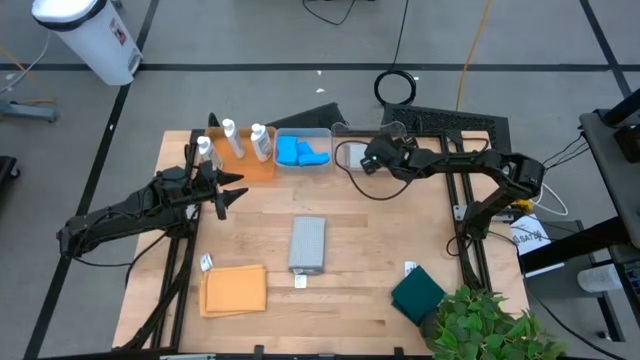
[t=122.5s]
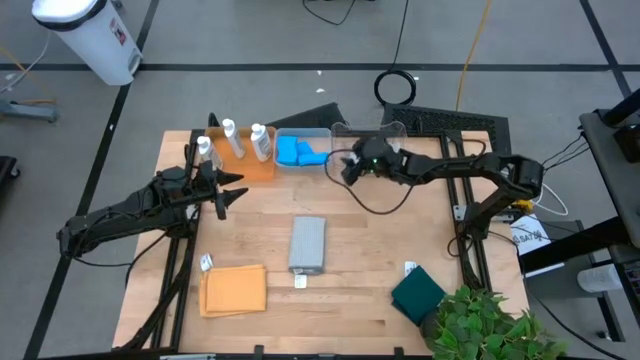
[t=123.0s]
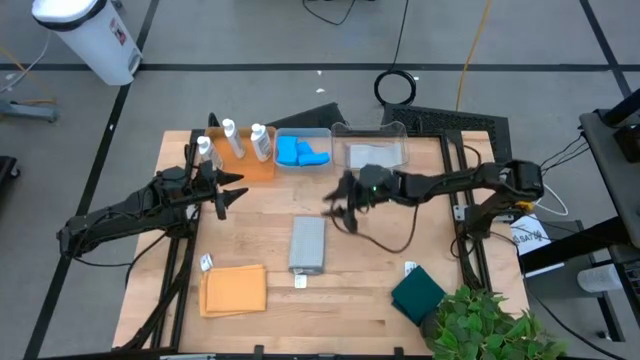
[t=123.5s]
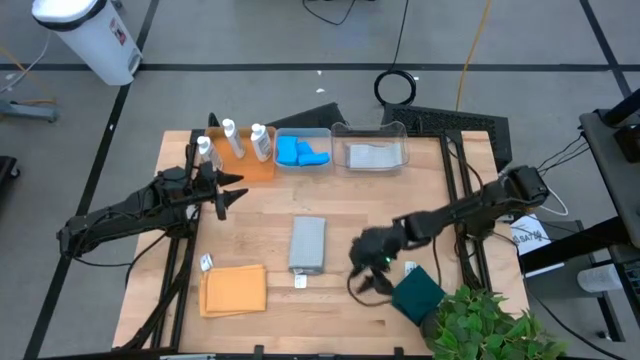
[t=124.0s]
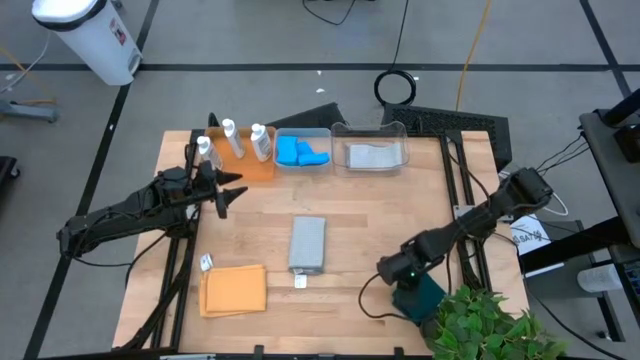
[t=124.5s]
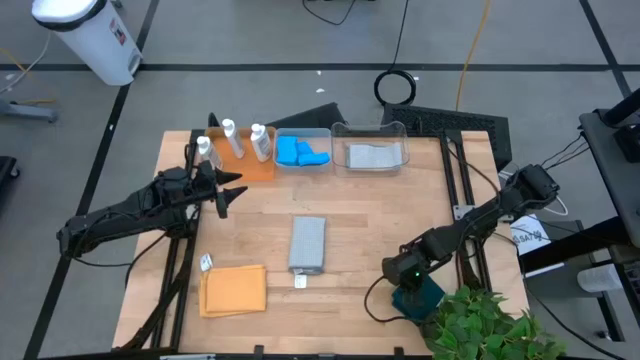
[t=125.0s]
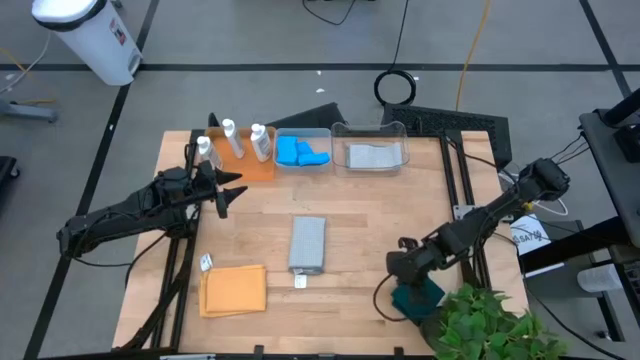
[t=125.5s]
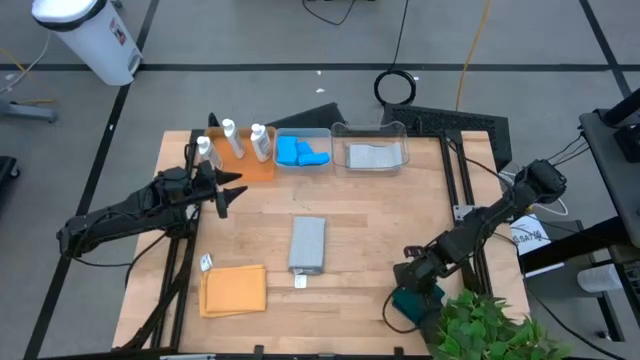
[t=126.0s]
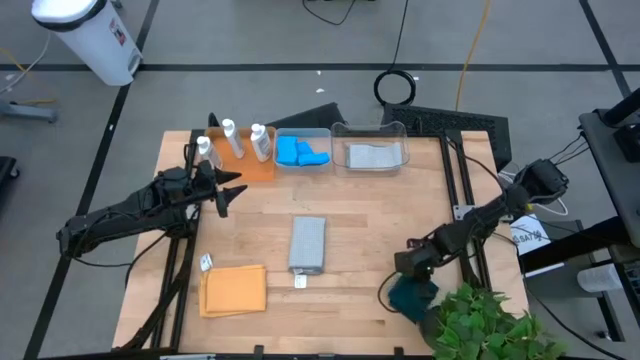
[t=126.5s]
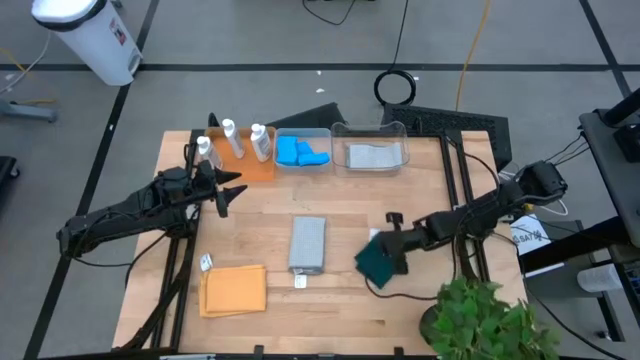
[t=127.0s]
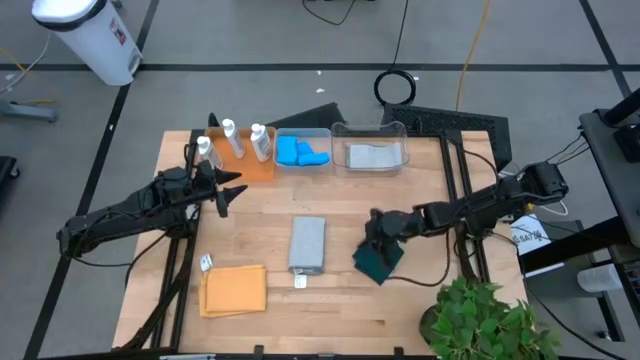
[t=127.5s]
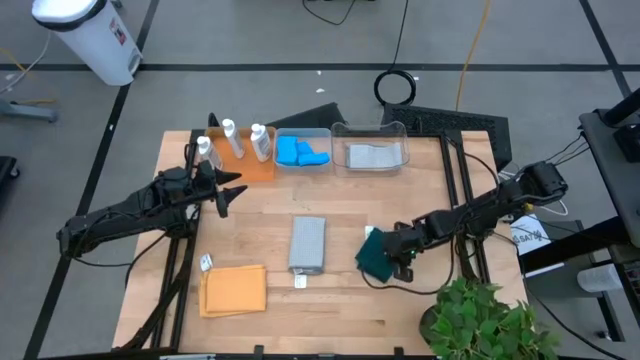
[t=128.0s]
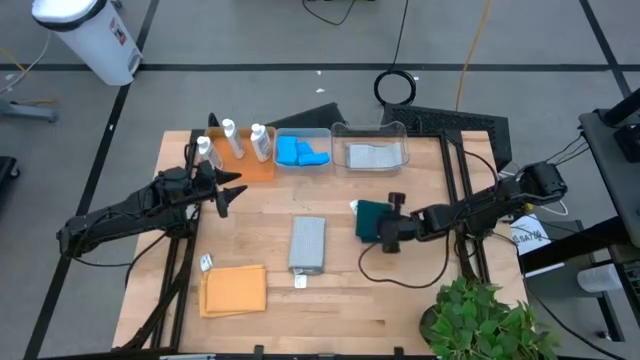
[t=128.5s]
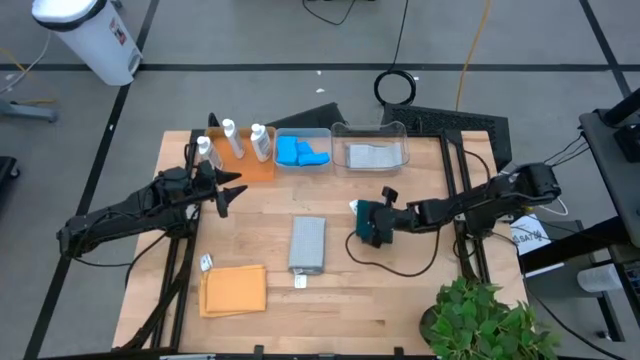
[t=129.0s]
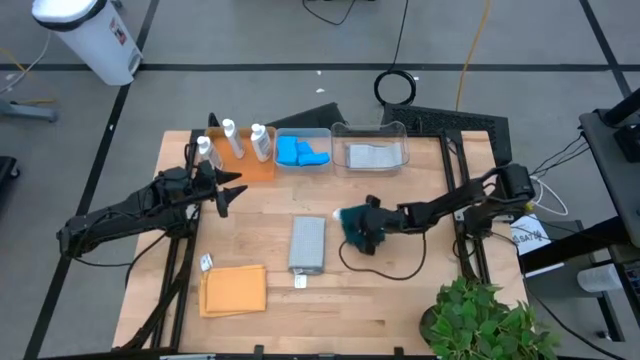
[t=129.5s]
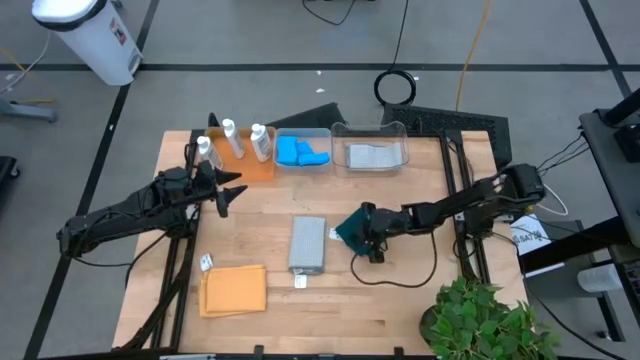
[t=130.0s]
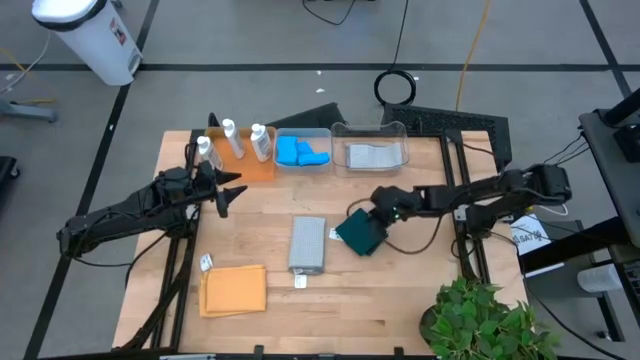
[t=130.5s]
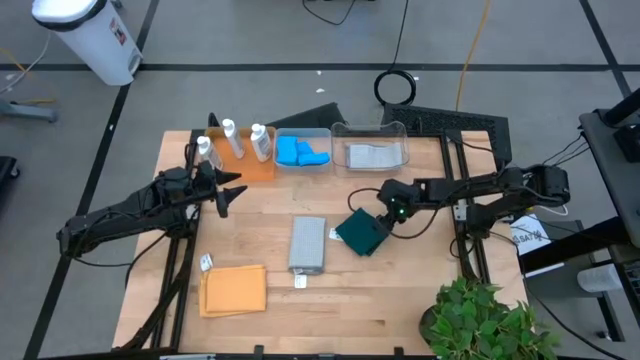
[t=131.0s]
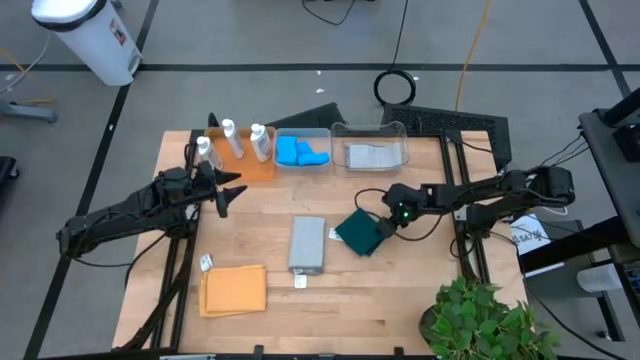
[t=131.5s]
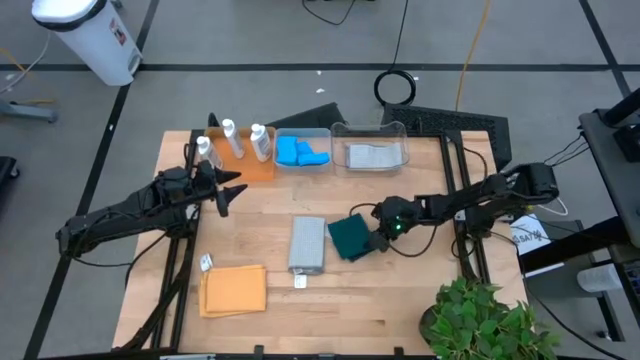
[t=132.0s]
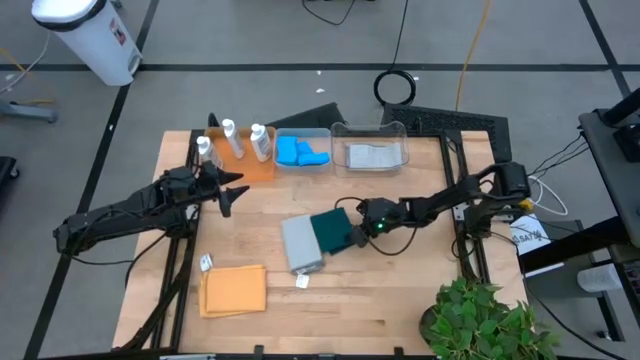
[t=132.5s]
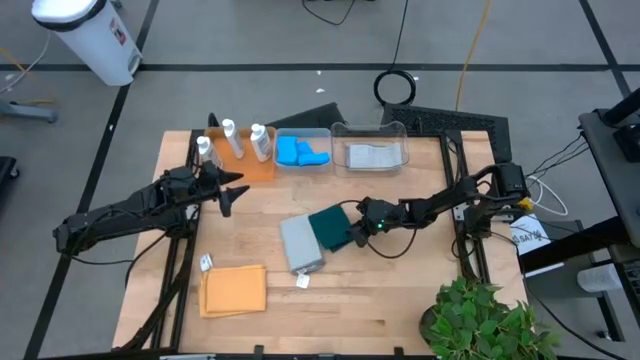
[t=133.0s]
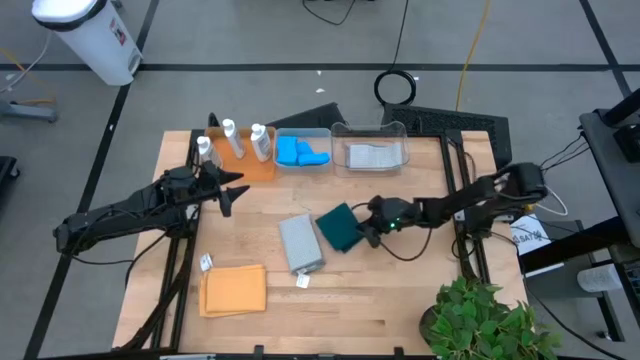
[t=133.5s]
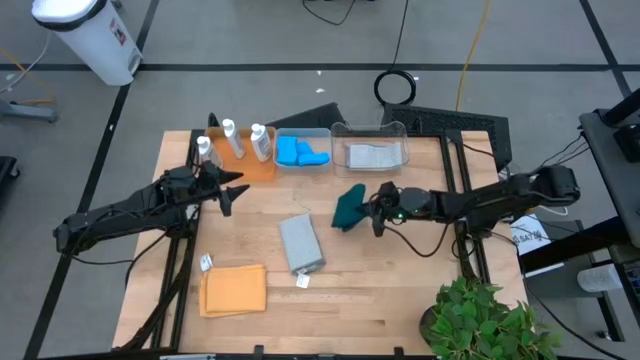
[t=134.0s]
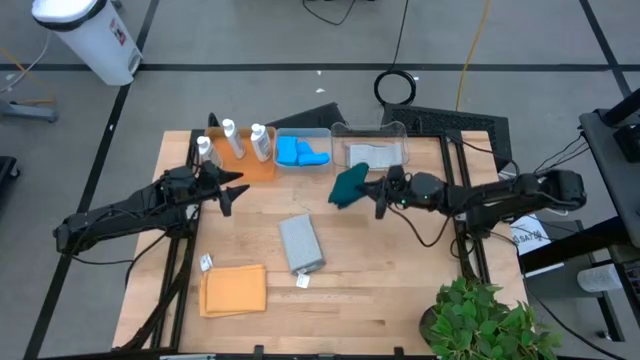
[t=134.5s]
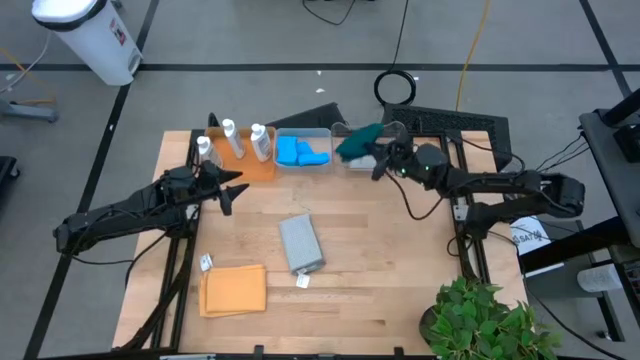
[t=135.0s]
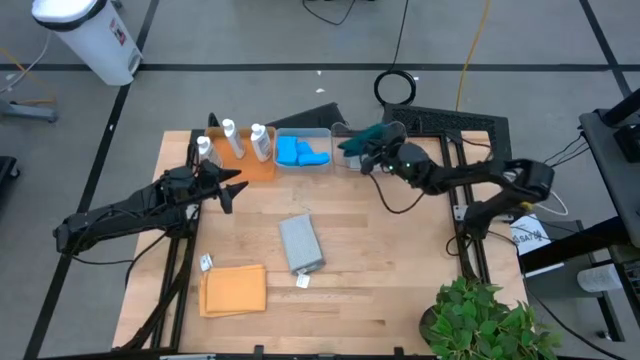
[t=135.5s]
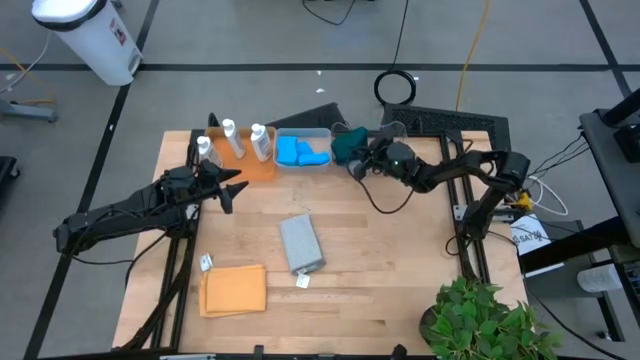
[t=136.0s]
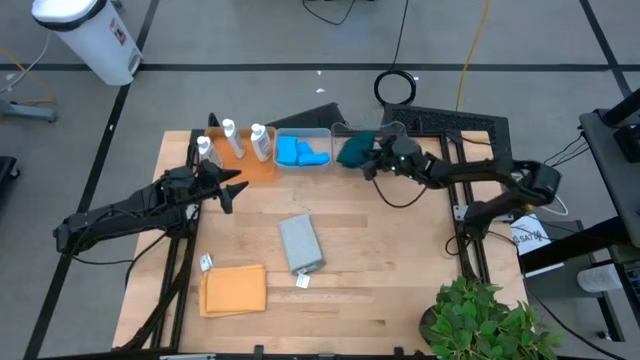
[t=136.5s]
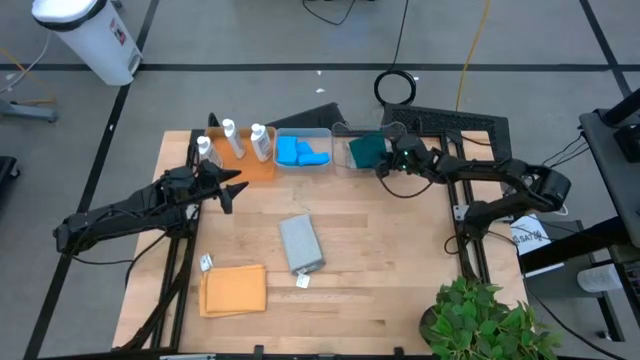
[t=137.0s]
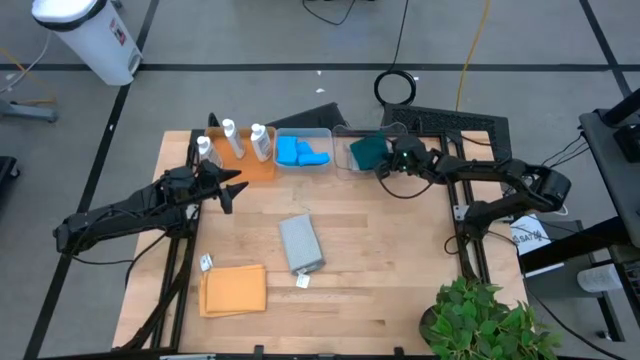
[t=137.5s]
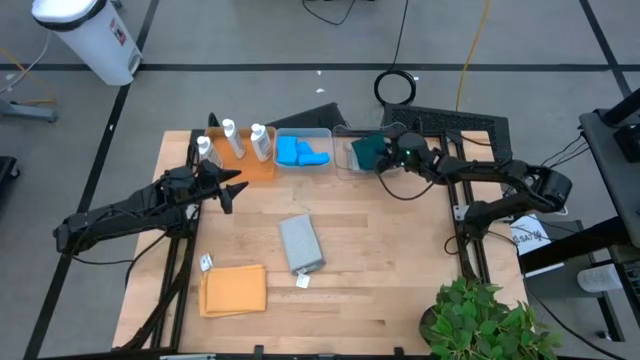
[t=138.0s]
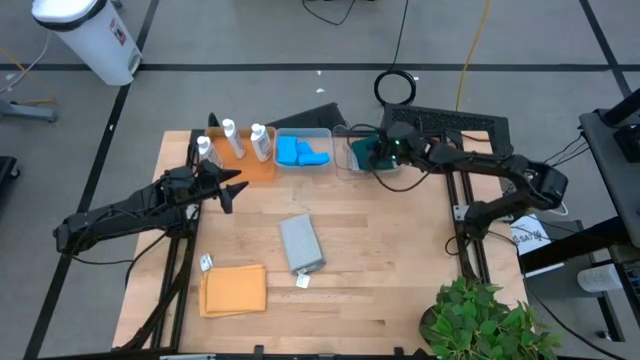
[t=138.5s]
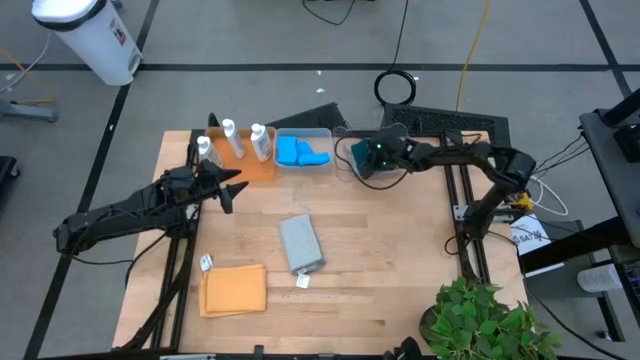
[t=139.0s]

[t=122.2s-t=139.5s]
Task: Pick & Place Kitchen Items
Put the green towel into the right transparent bin

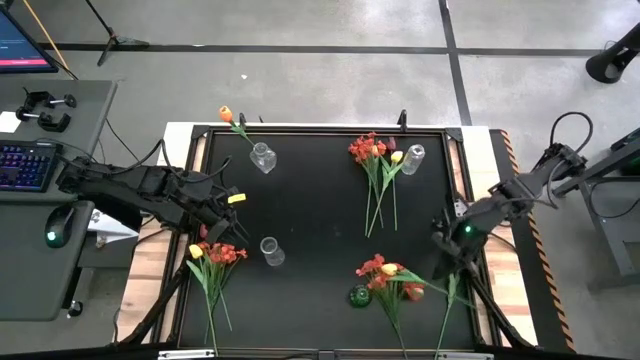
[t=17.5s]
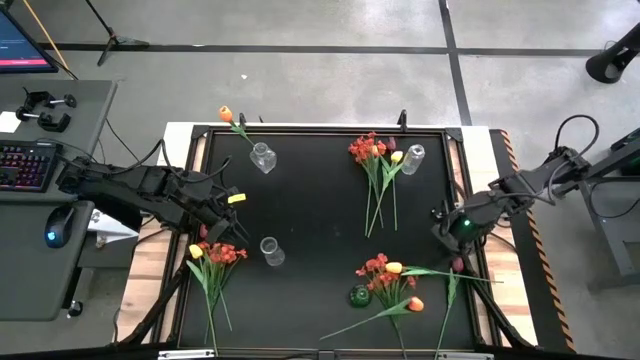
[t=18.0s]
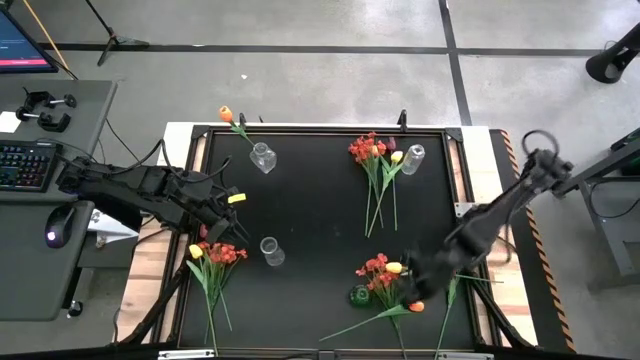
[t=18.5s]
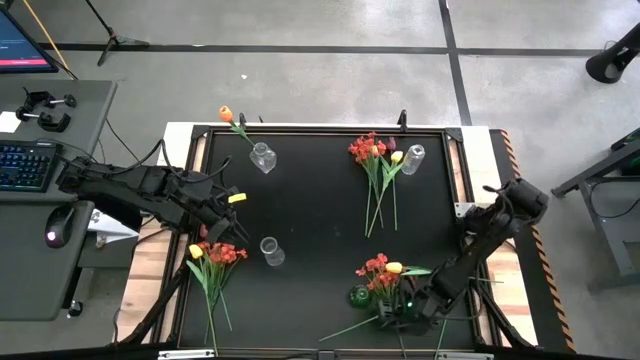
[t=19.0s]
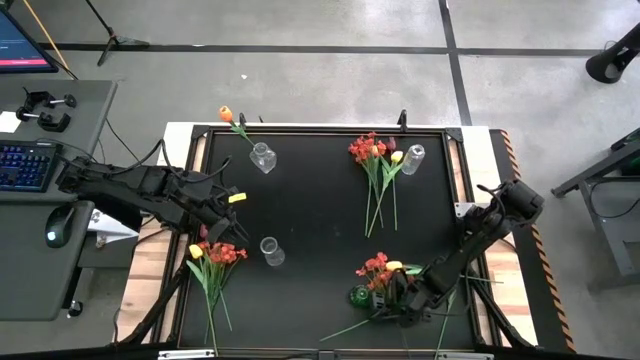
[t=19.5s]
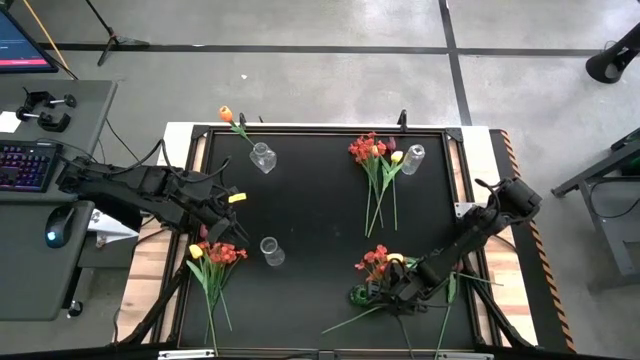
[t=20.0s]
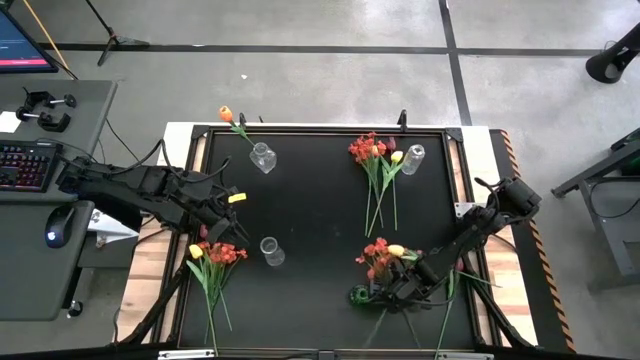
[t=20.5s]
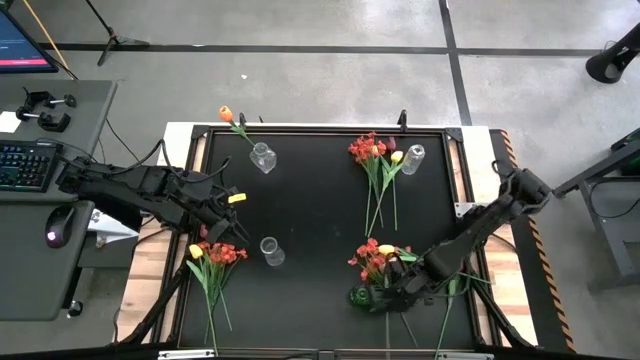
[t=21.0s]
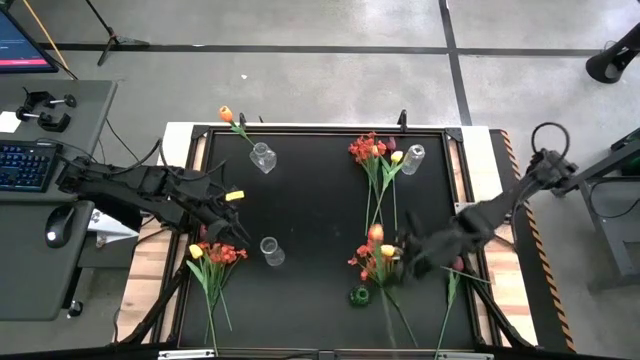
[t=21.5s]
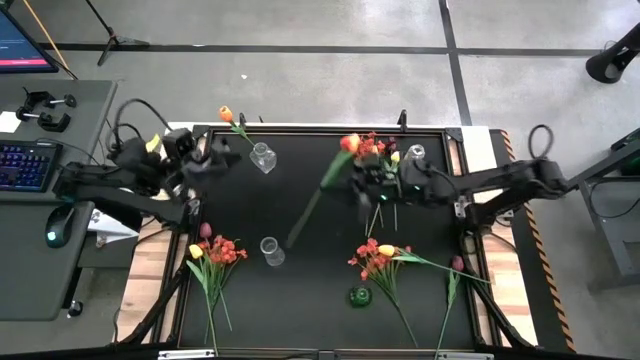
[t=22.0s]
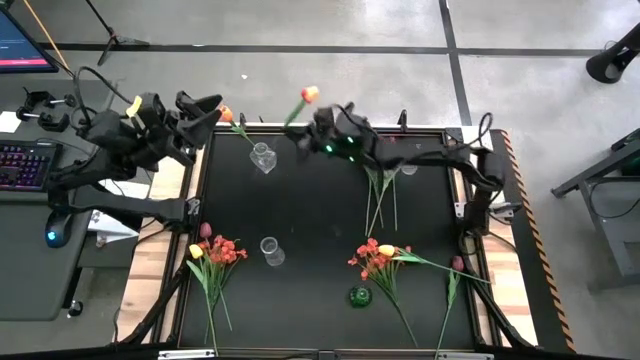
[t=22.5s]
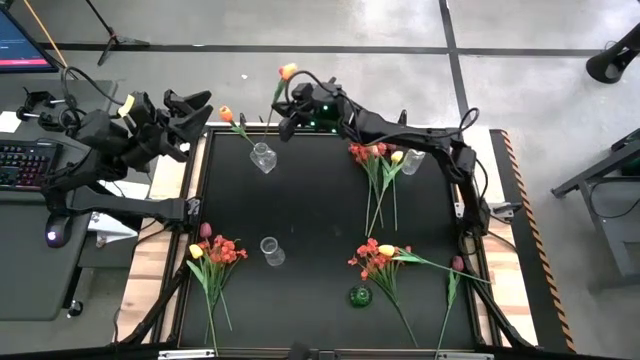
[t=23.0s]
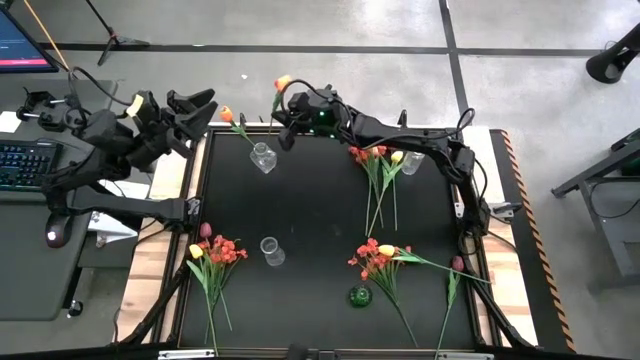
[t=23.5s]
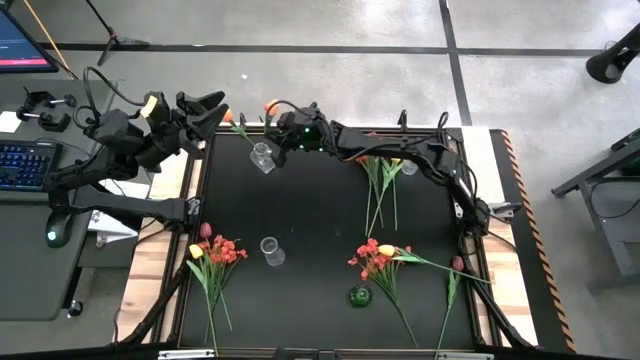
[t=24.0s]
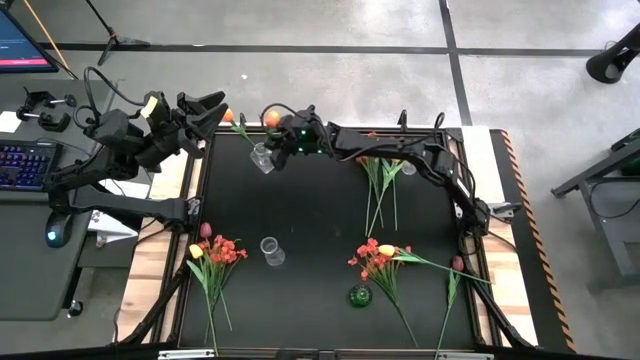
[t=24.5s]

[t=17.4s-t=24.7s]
Task: Sort flowers into vase by color
Put the bottom orange flower into the top left transparent vase
